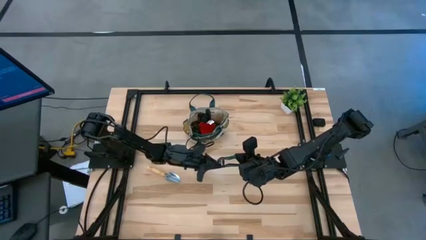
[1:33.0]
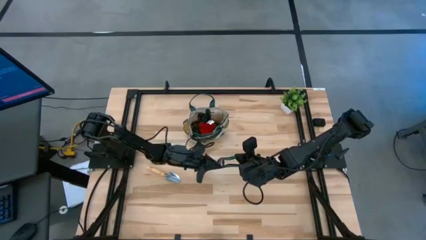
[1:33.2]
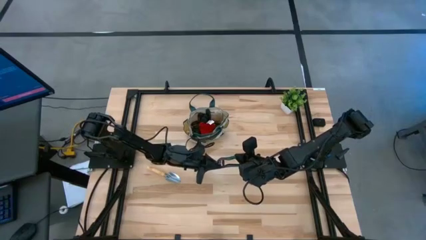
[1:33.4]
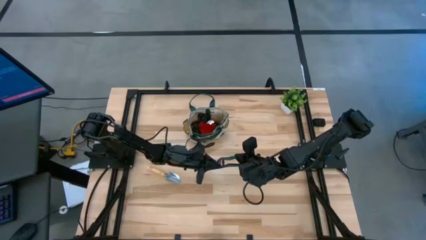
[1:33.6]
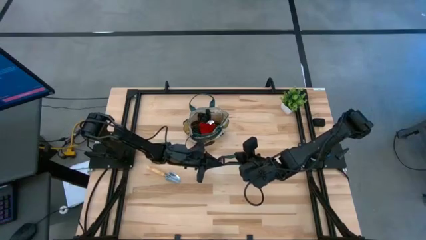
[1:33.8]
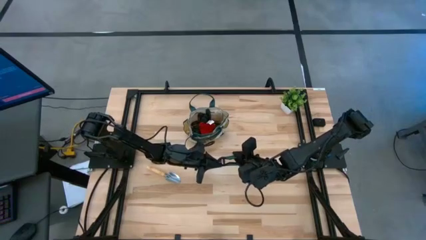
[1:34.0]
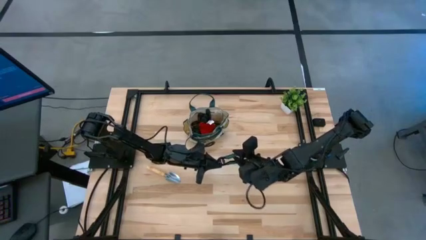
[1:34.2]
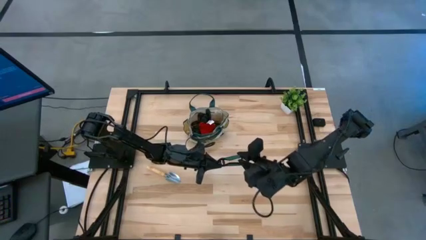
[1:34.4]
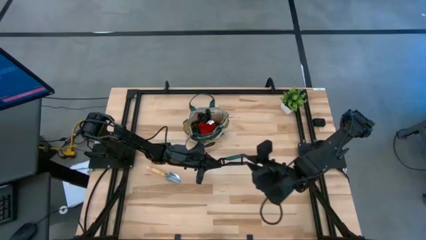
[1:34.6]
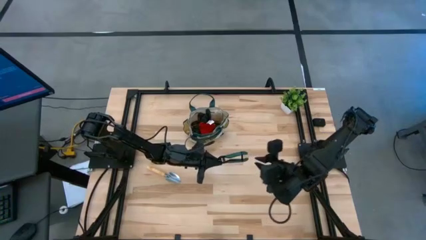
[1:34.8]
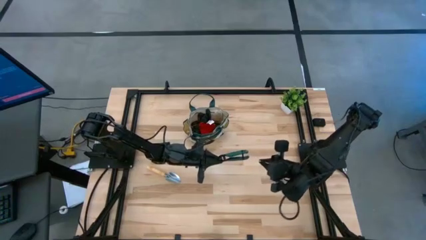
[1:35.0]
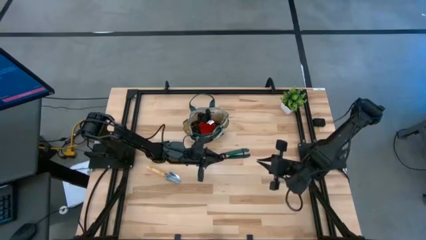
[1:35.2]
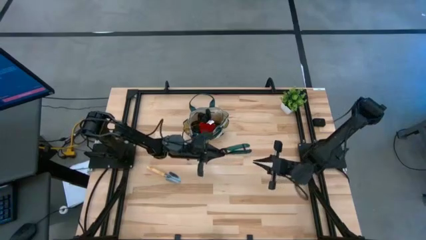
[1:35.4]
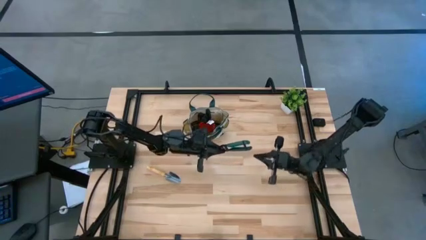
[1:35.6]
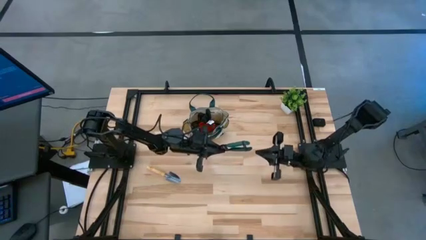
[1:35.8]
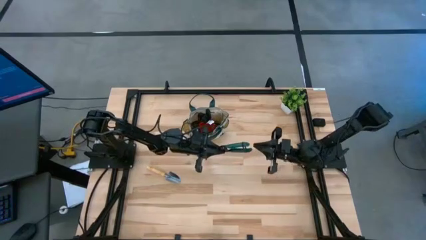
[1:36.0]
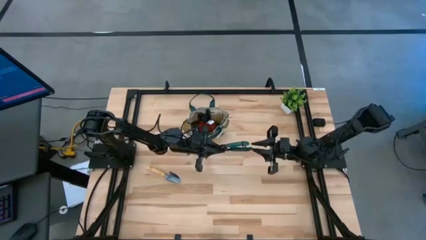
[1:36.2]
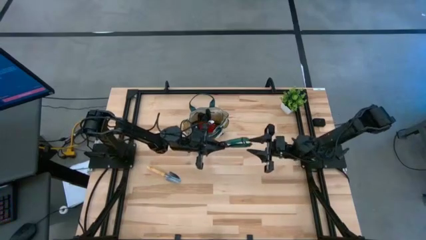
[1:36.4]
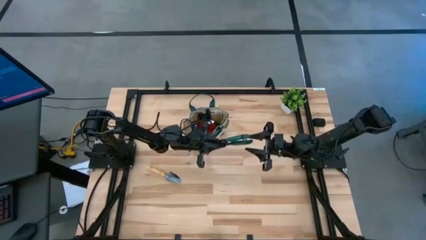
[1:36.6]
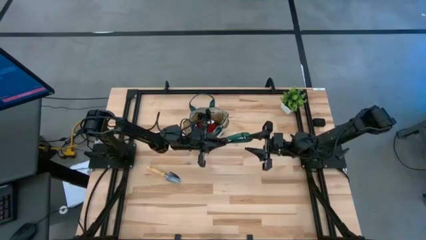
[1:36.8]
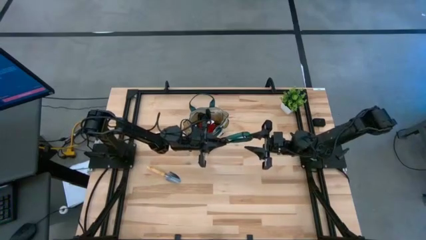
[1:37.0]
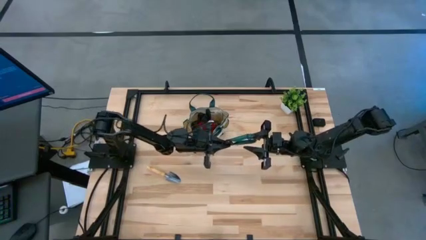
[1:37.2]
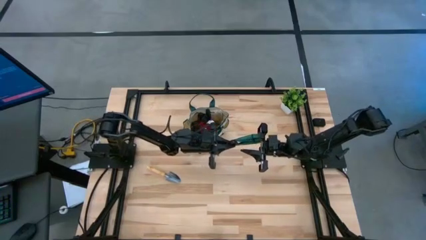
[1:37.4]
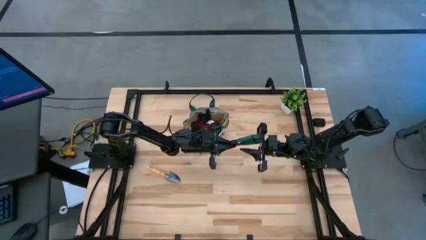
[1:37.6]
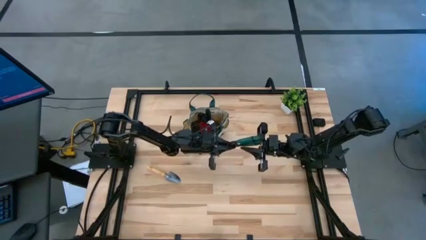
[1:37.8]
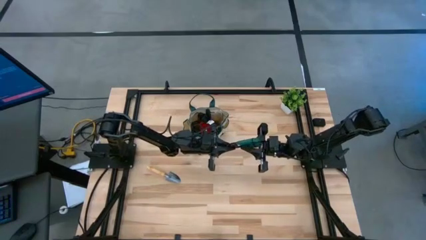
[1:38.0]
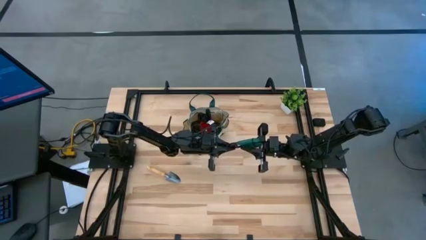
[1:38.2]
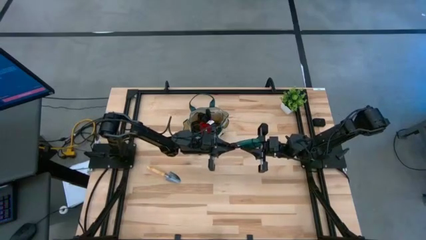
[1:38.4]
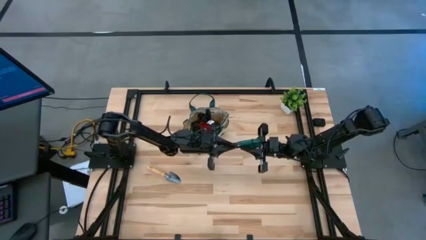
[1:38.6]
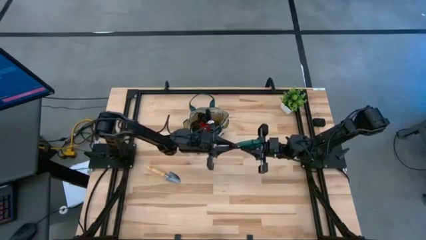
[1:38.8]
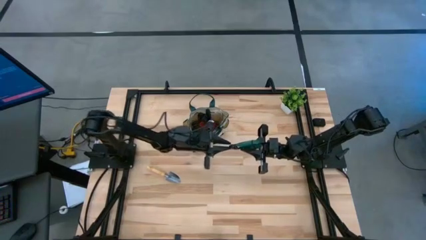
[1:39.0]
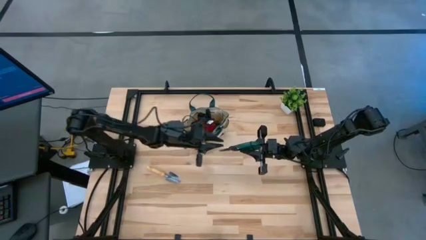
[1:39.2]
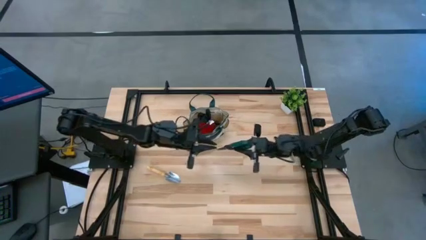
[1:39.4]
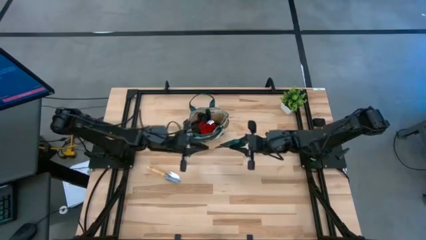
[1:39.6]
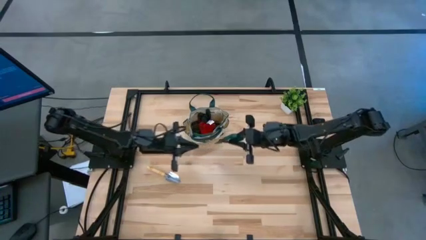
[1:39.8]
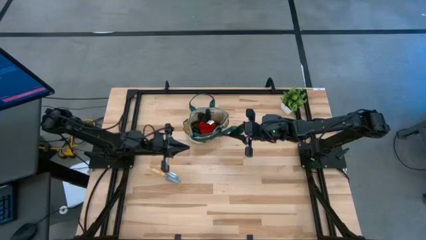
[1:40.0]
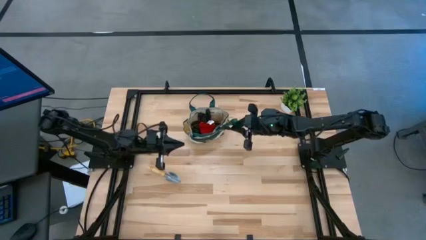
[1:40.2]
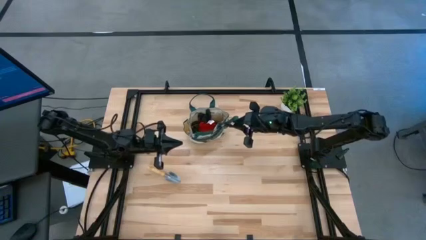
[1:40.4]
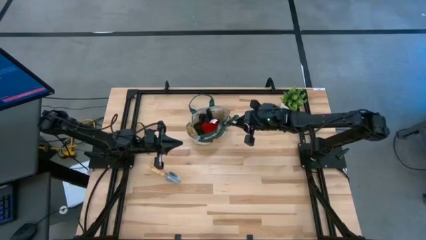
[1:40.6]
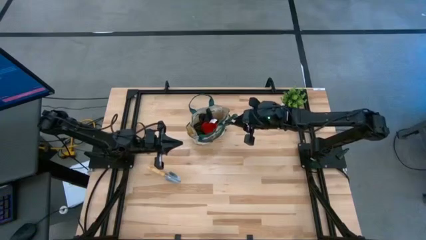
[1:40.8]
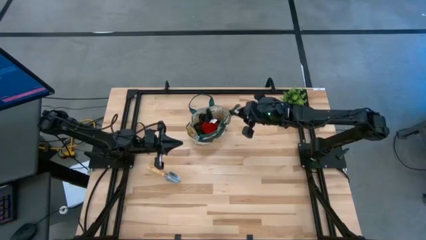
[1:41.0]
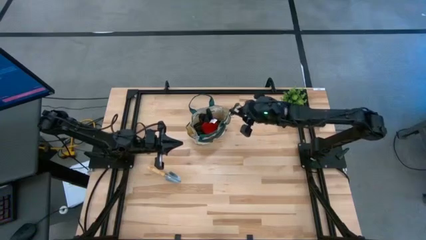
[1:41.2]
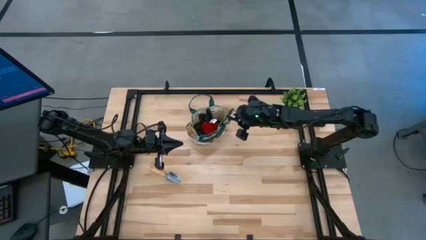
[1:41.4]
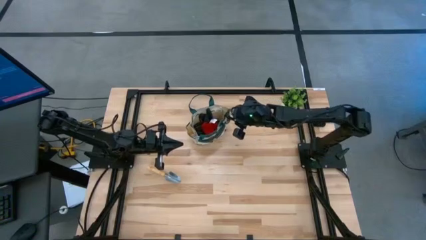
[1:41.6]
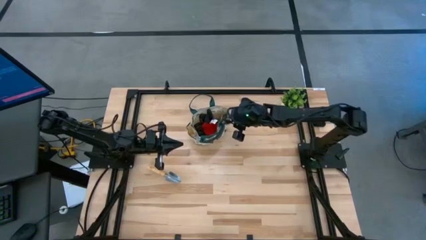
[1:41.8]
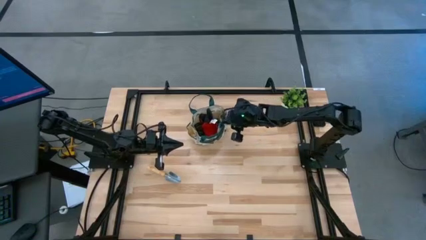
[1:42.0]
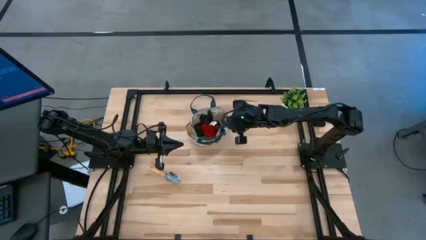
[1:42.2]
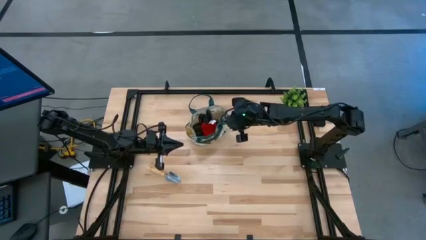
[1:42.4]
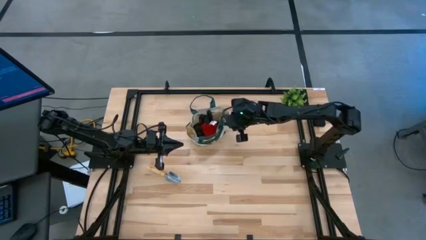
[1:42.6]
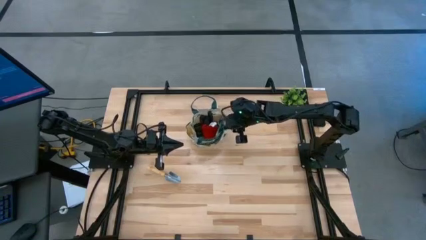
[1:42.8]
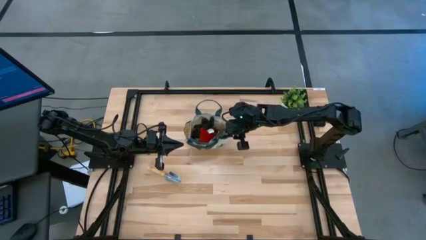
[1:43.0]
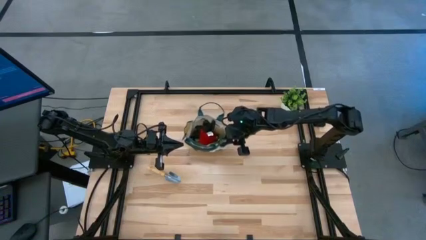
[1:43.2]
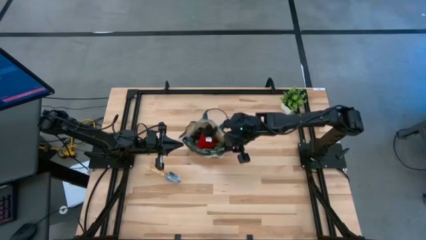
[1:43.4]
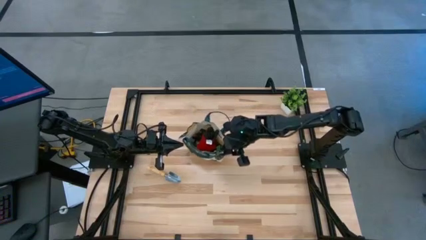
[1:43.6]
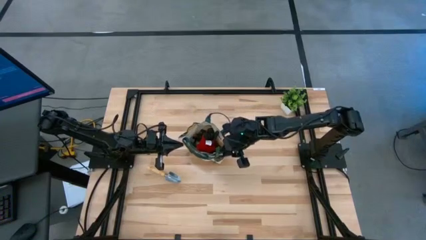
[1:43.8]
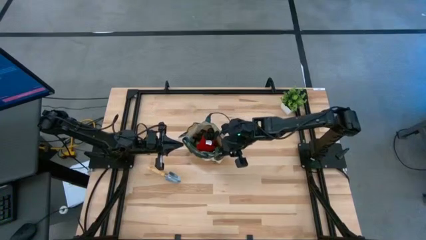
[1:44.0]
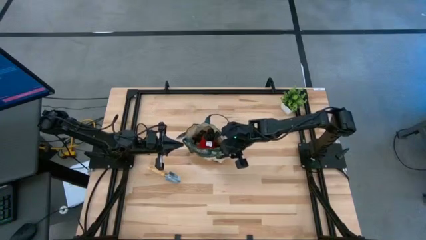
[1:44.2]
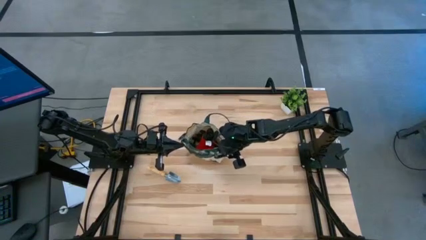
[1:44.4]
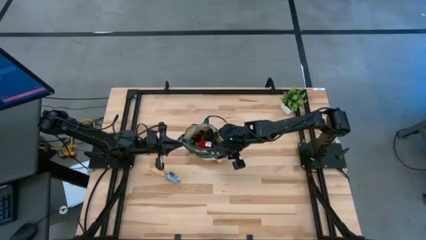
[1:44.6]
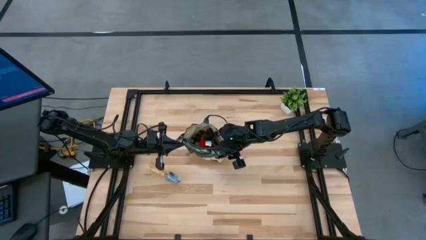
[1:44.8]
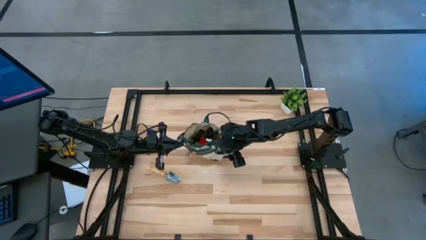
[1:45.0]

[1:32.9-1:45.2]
Task: Pick & Place Garden tools in Gardening bag
Put the green shear scissors into the brown gardening bag

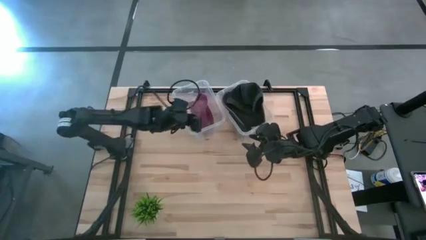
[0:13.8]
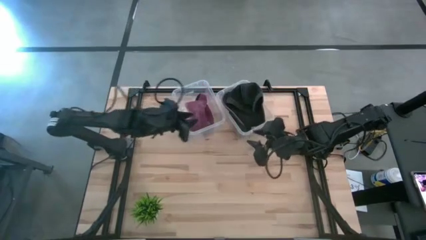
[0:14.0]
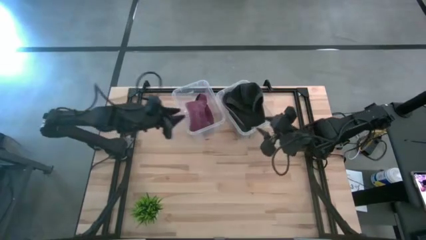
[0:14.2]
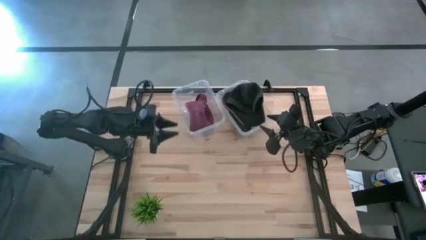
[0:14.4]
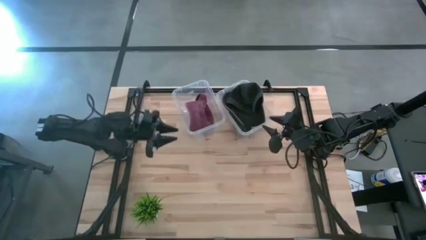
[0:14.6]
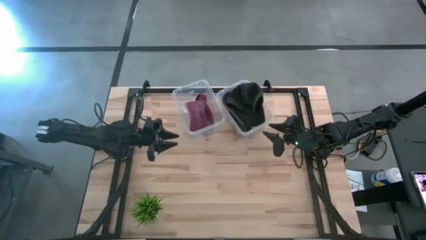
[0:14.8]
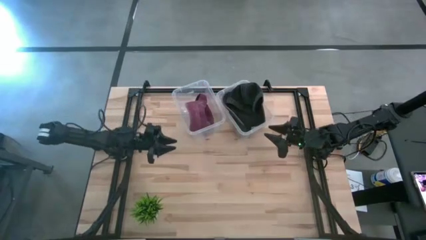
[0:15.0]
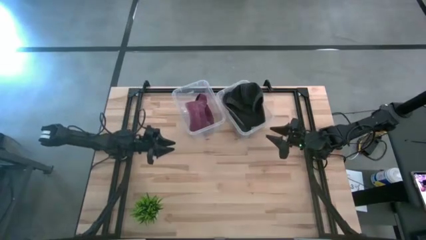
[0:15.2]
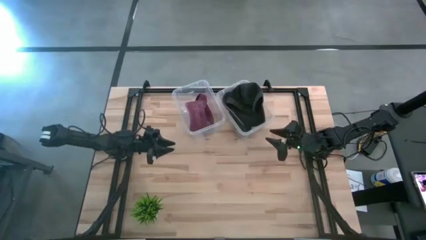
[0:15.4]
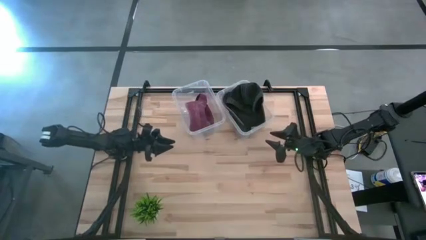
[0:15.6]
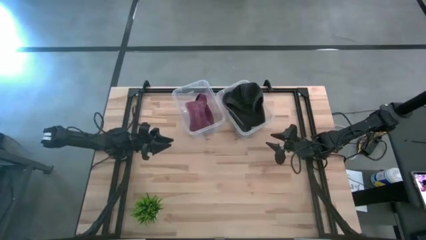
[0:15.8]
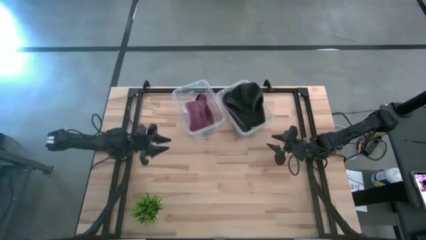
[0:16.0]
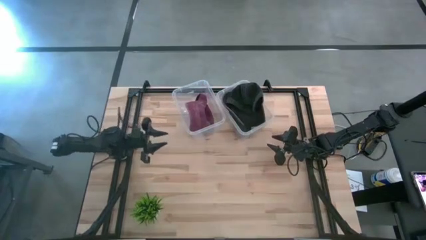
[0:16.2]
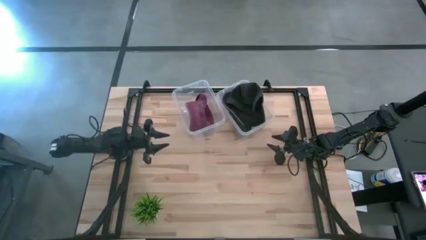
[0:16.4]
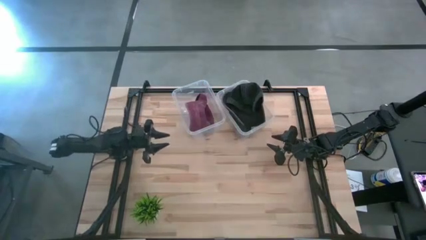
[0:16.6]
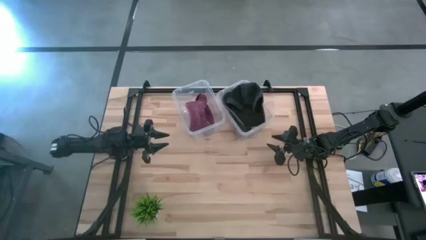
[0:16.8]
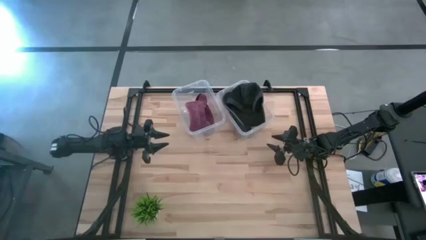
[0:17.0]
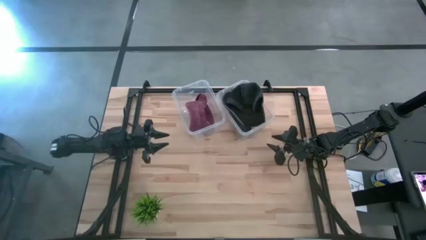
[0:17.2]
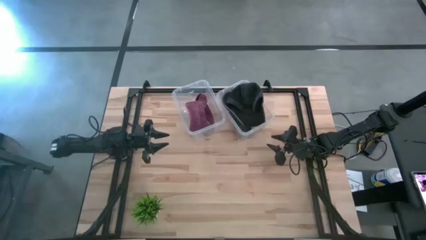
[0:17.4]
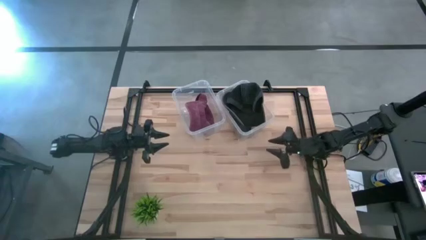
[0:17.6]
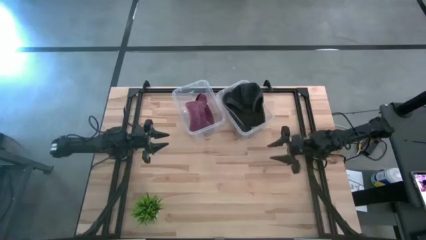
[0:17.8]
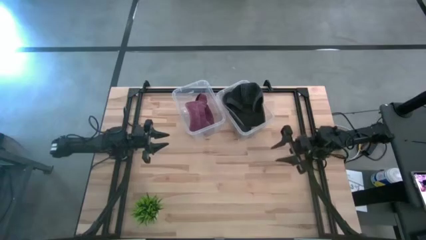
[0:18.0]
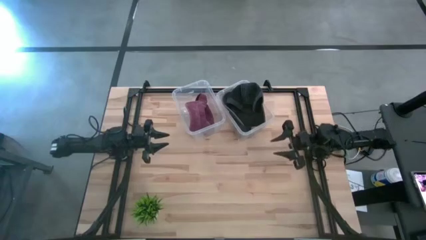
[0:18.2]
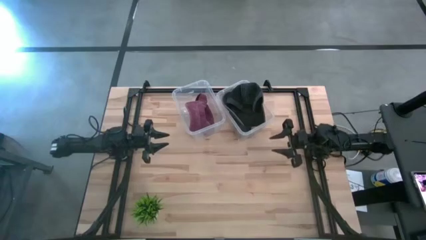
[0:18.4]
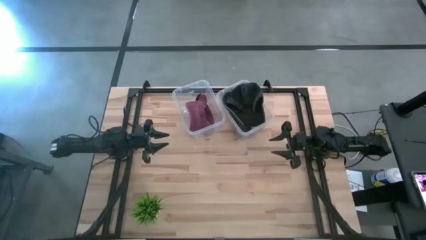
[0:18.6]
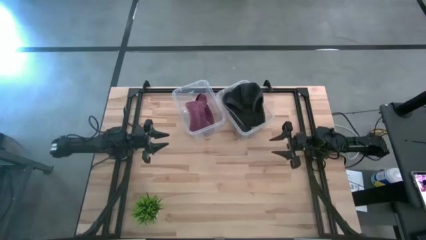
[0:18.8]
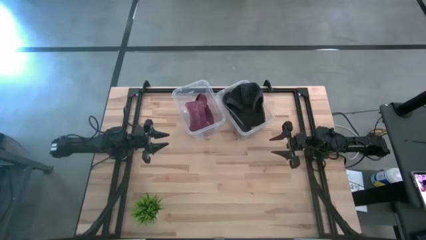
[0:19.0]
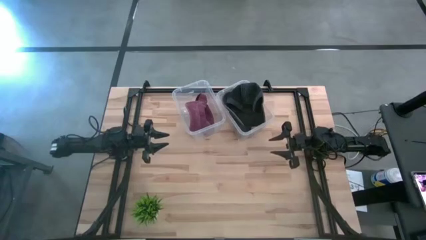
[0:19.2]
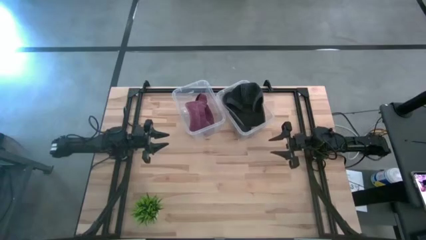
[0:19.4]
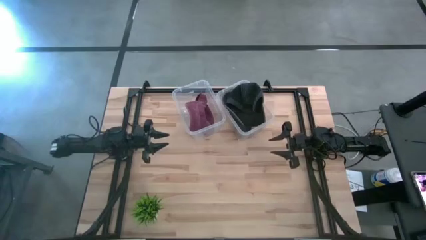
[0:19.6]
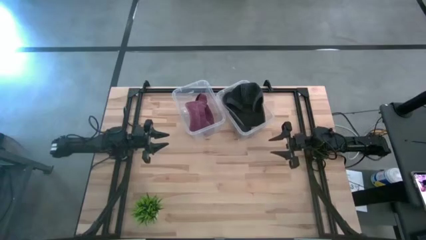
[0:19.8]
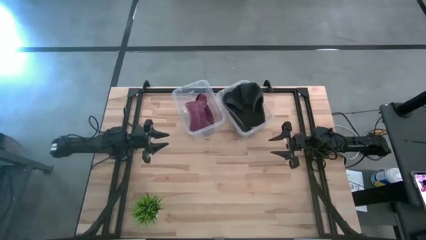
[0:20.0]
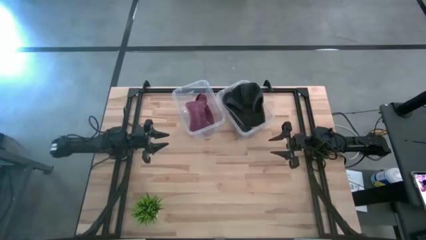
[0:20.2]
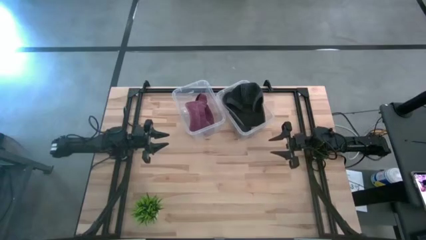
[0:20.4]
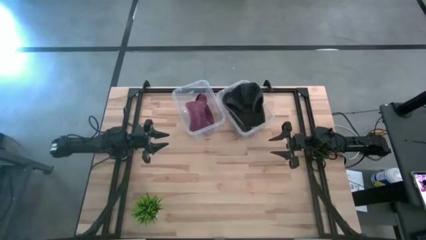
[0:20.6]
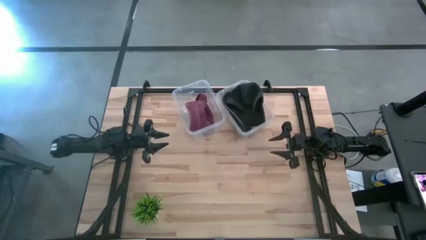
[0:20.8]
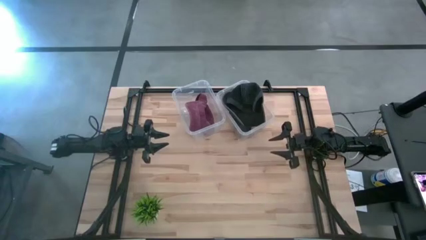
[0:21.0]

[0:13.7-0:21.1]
Task: Pick & Place hat
Return to Home Position
